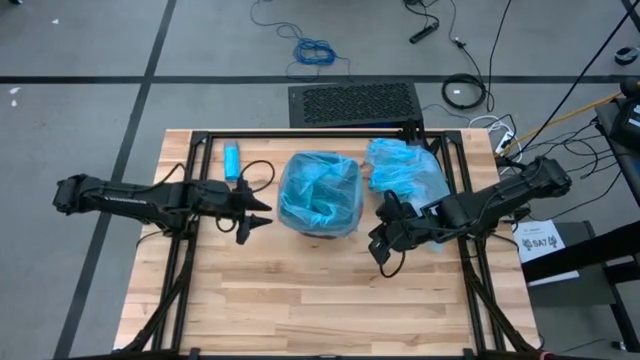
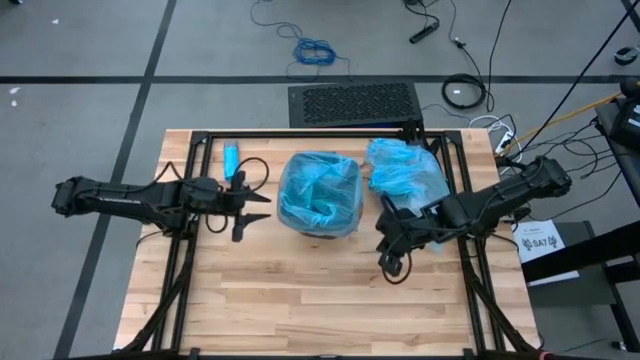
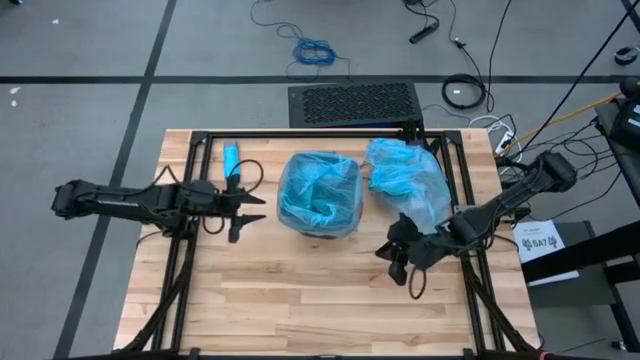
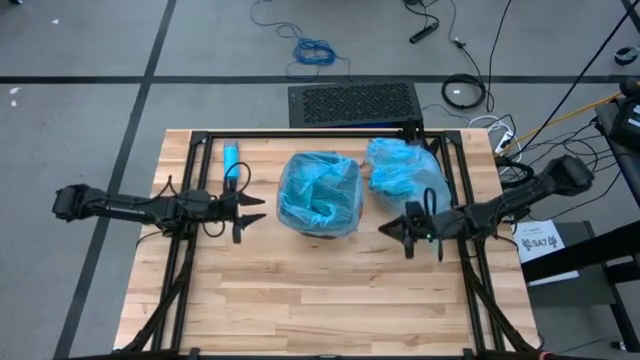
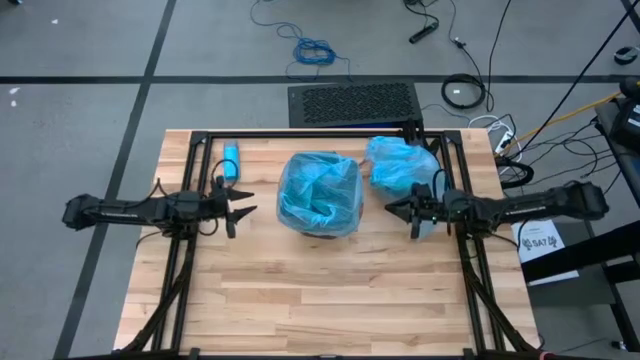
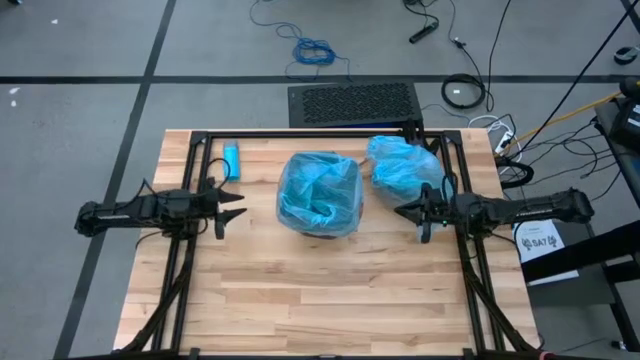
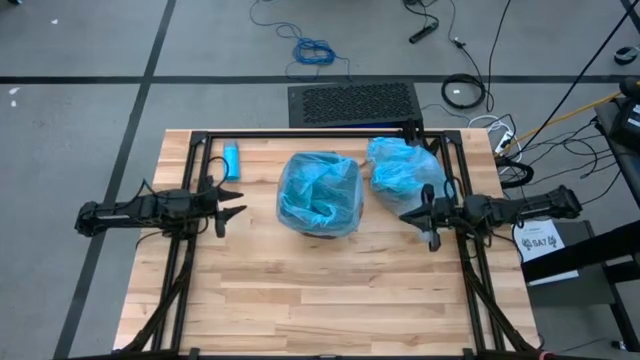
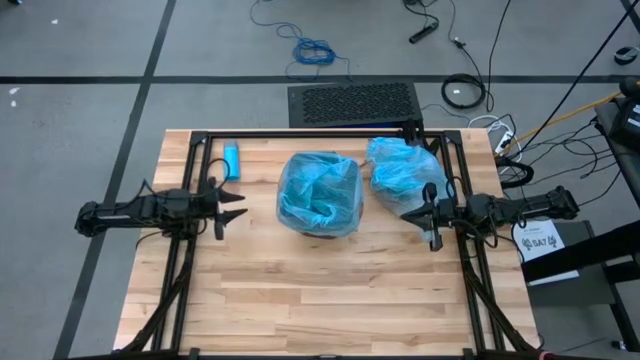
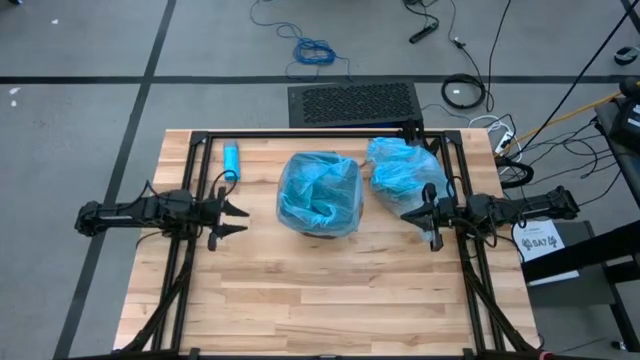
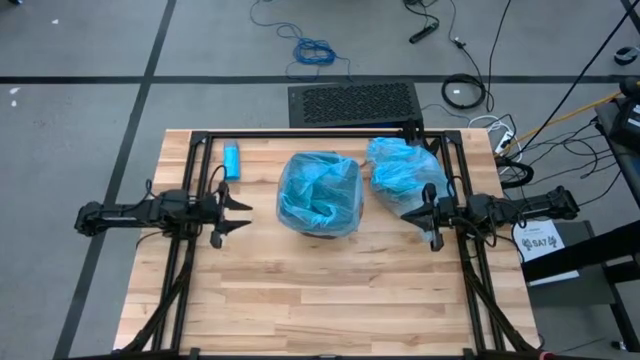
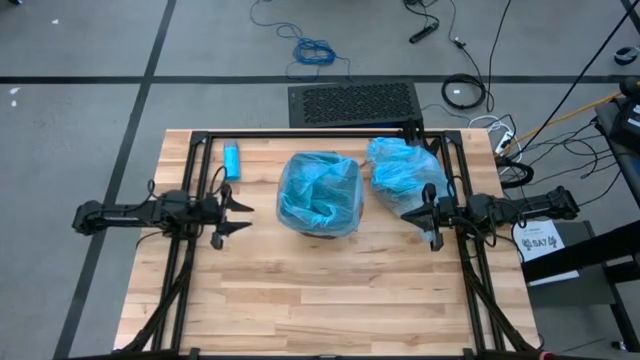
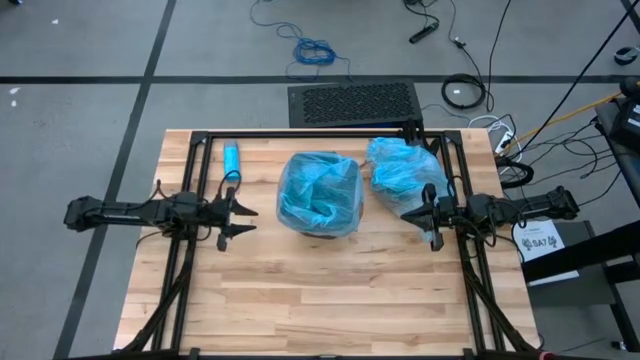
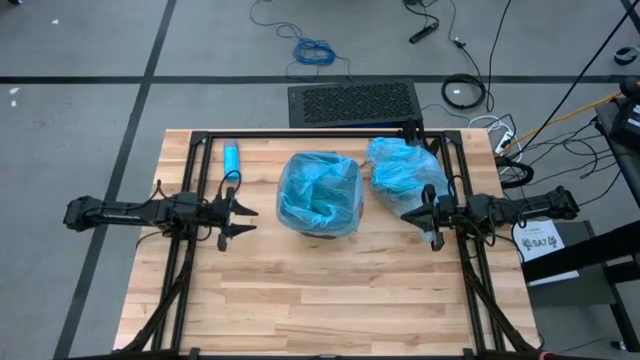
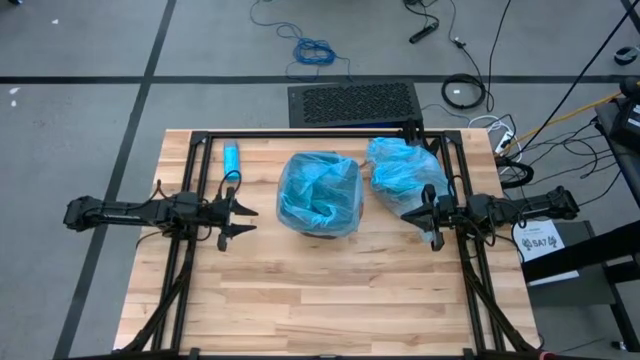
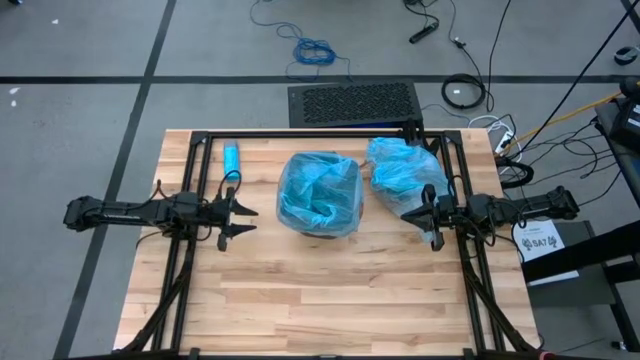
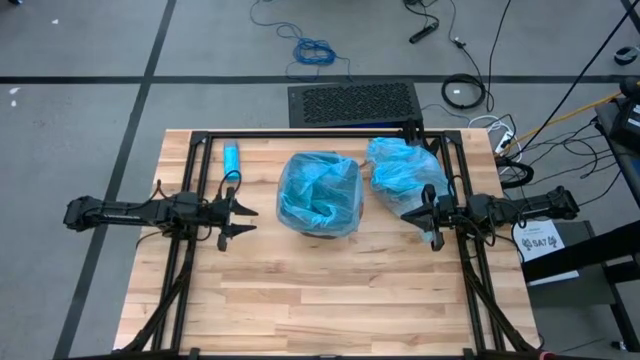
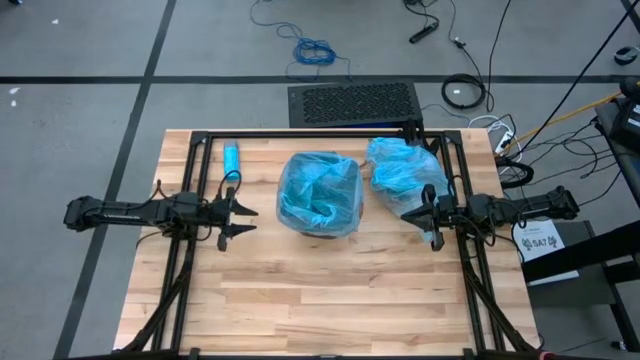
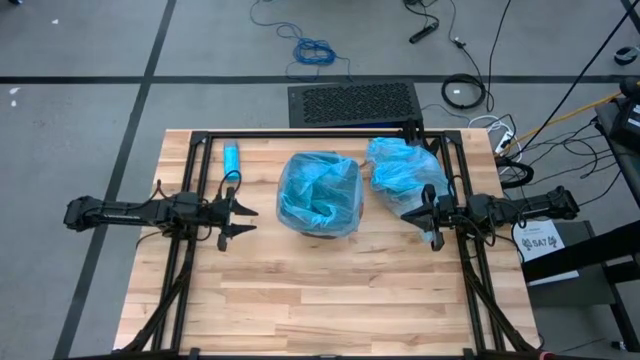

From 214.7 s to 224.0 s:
Task: place trash/remove bag and relplace
Return to Home Position

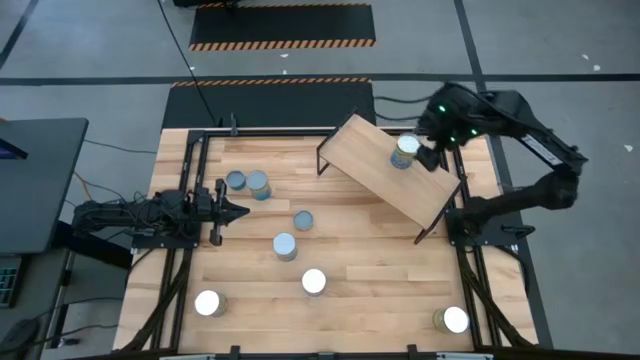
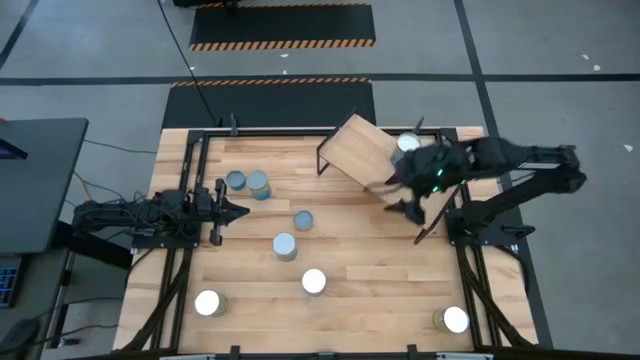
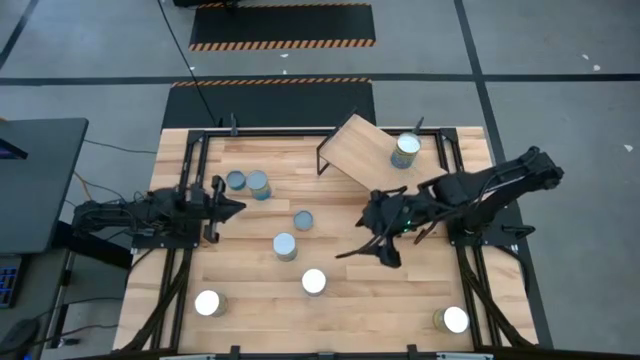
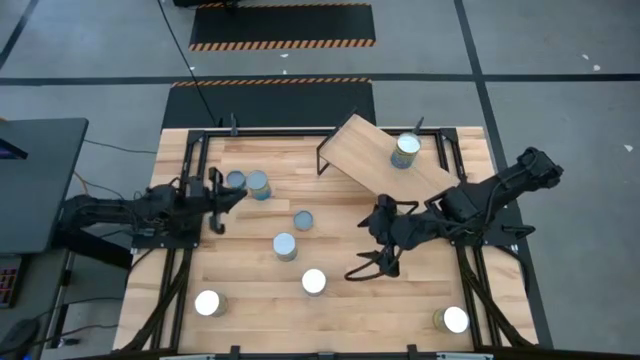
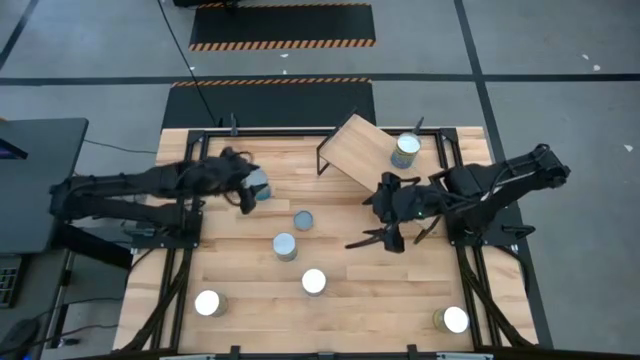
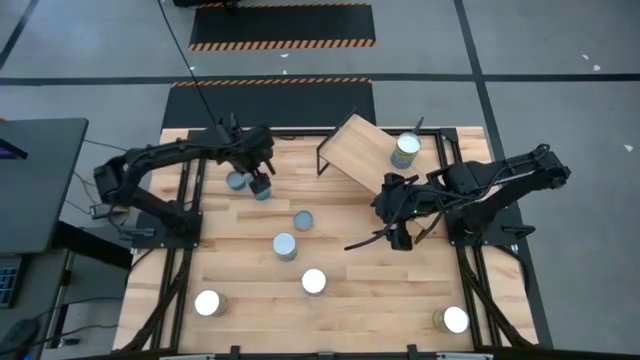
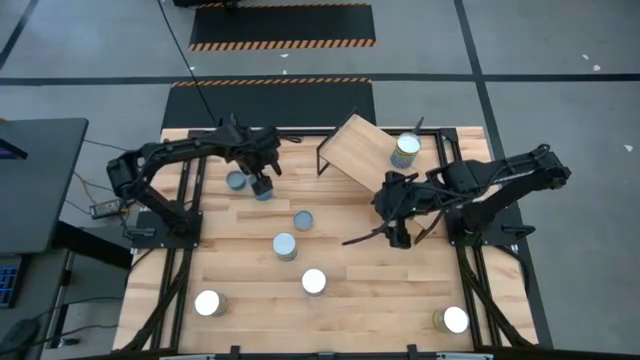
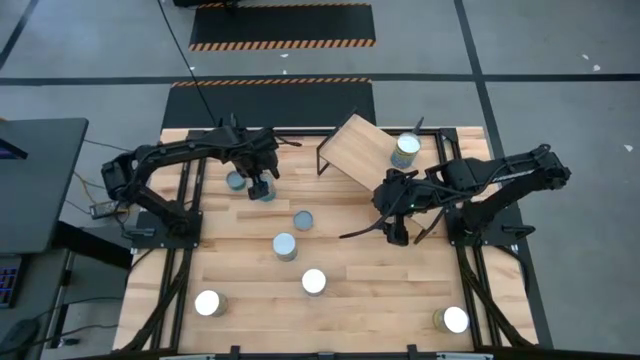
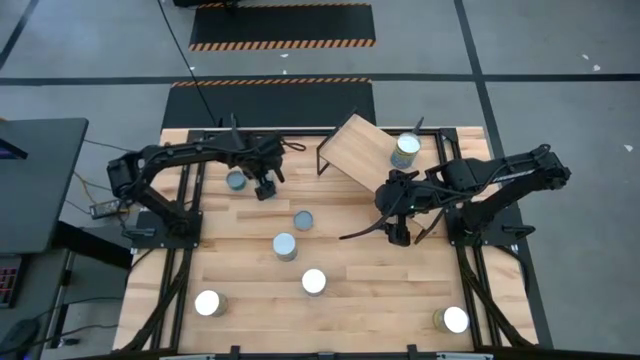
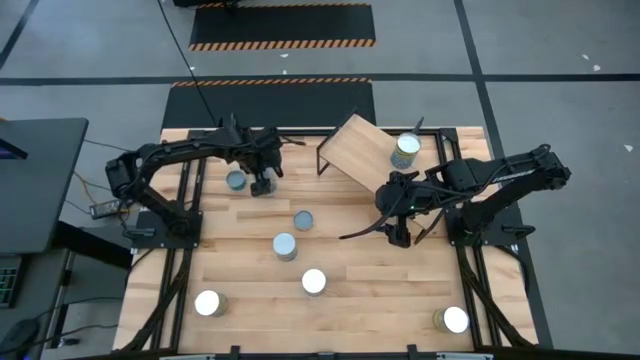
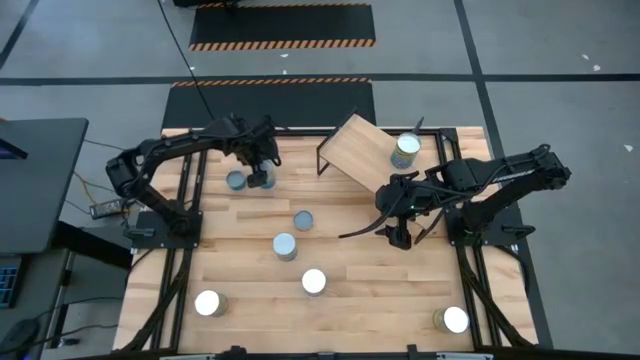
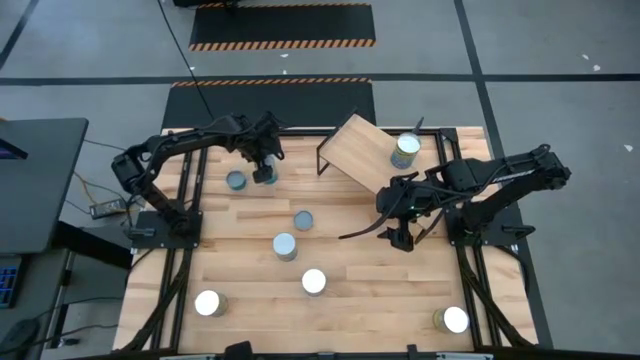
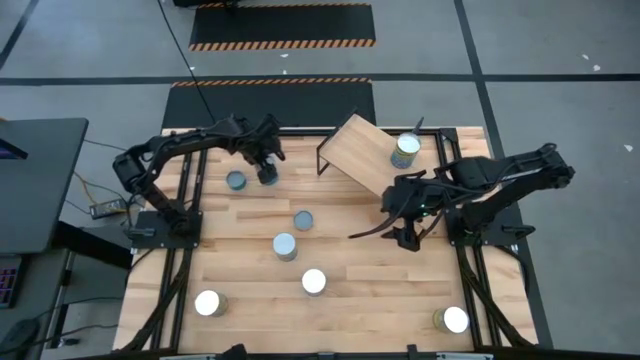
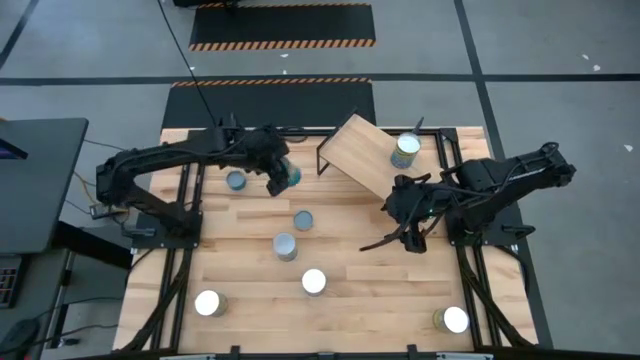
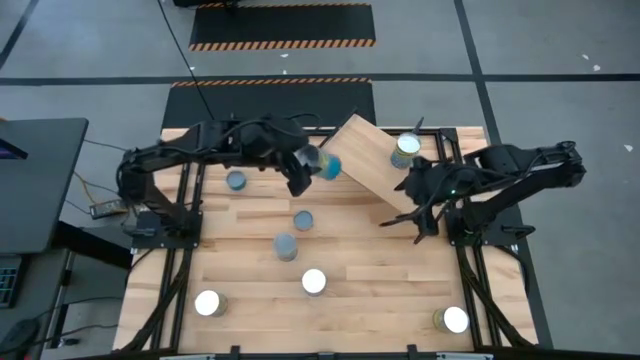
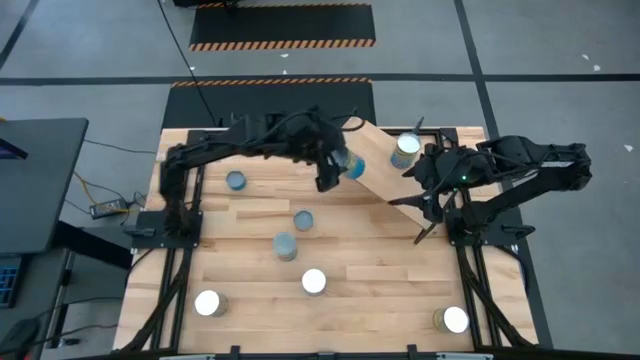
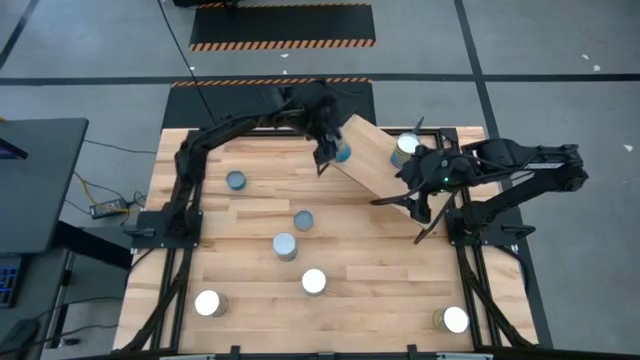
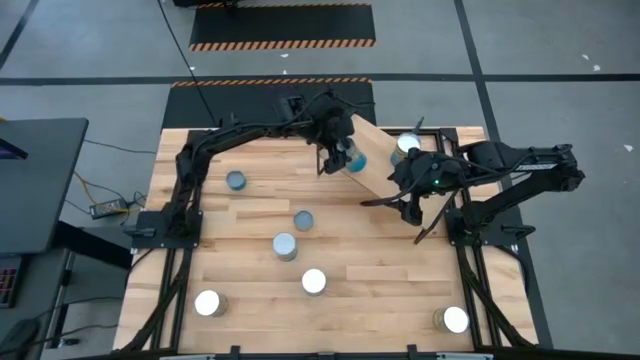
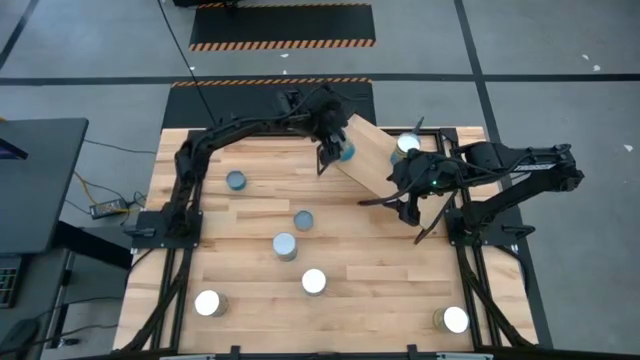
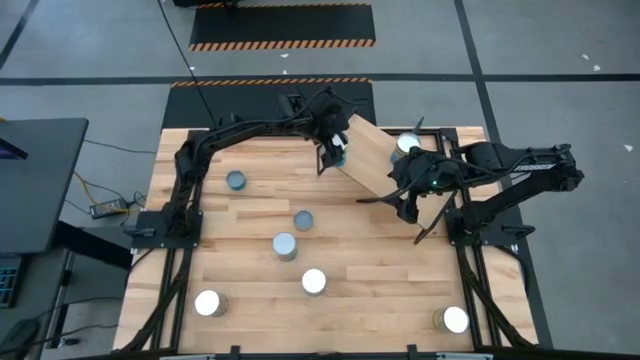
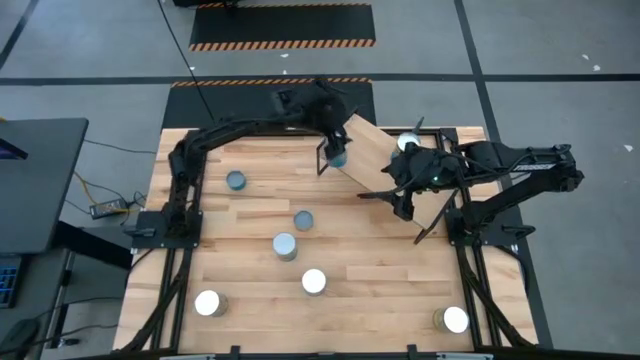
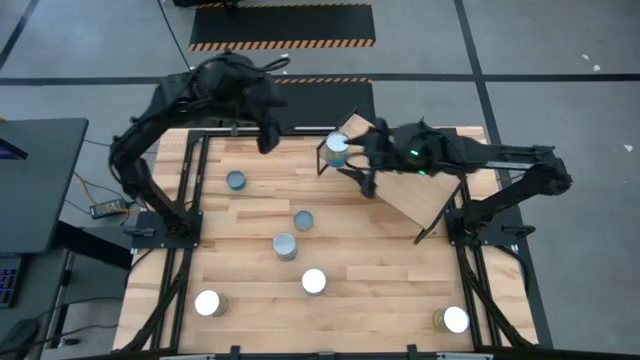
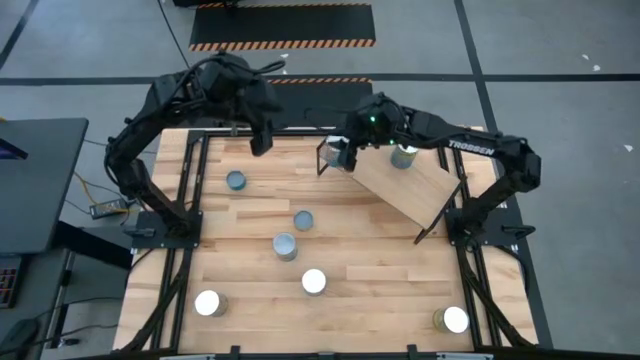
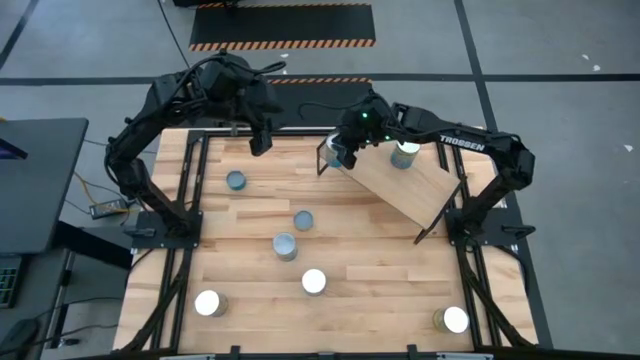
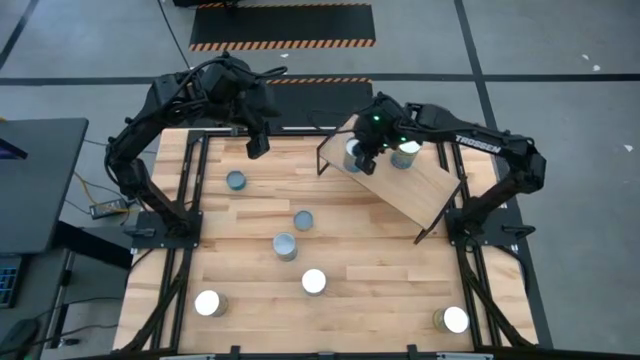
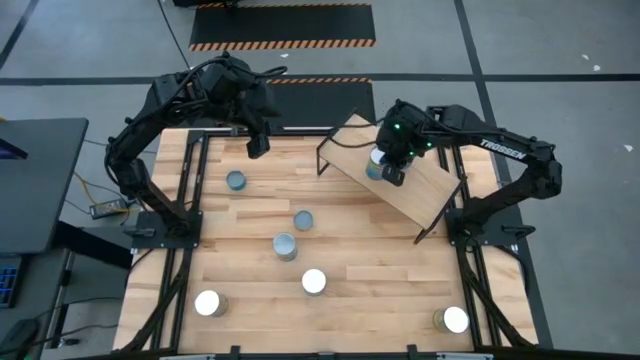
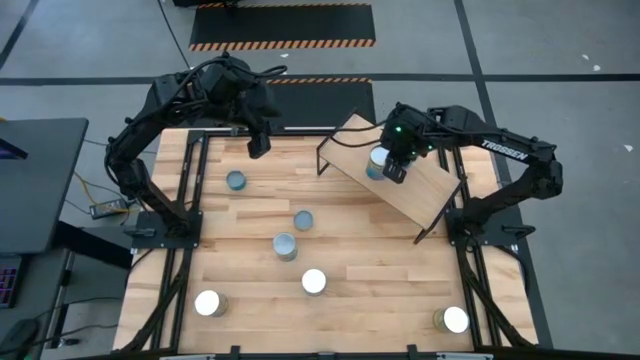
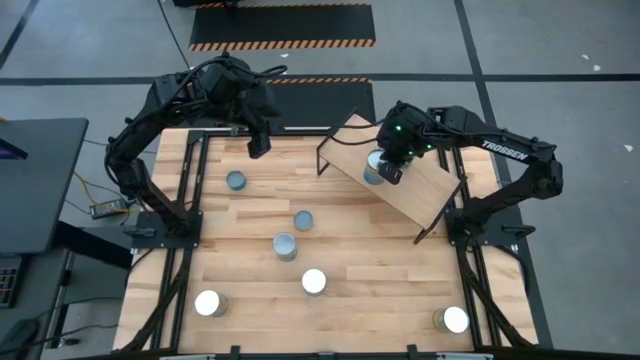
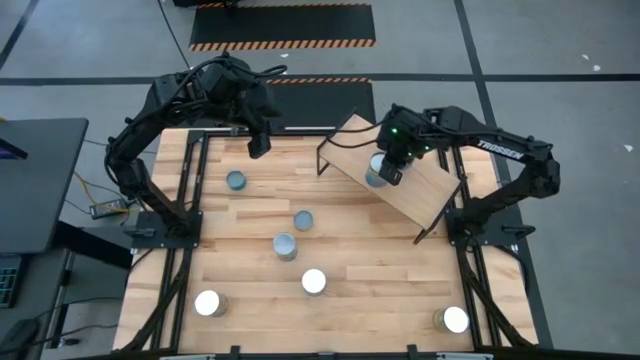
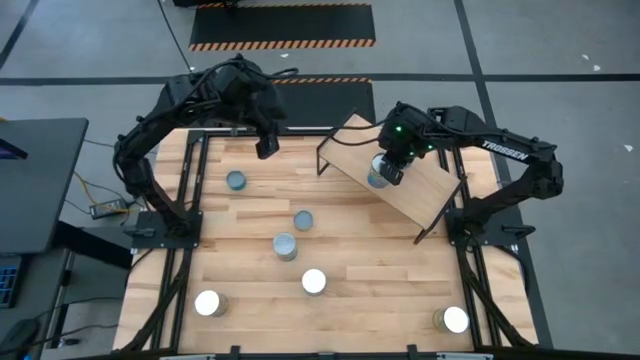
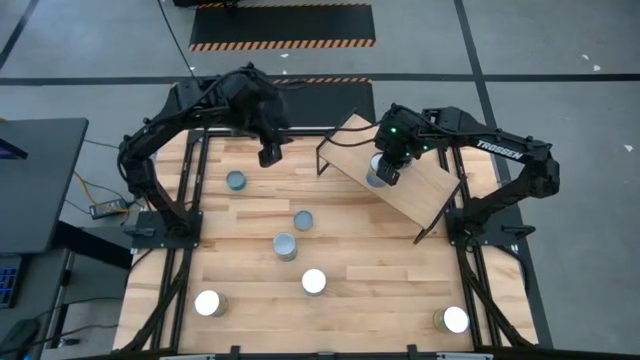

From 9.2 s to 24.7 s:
Task: Pick and place cans onto a shelf
Put the canned cherries on the shelf aligned with the other canned cherries
